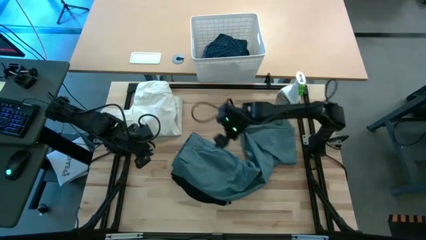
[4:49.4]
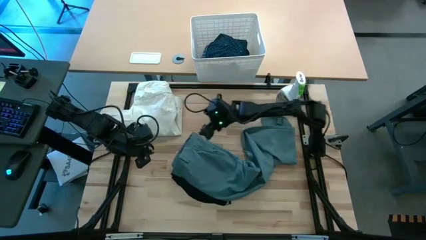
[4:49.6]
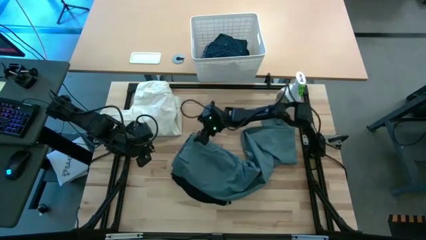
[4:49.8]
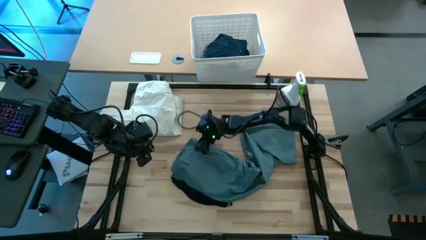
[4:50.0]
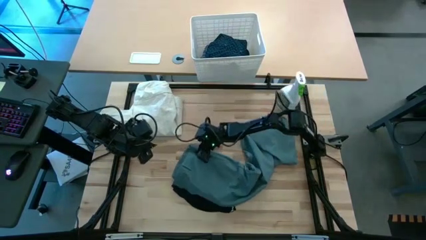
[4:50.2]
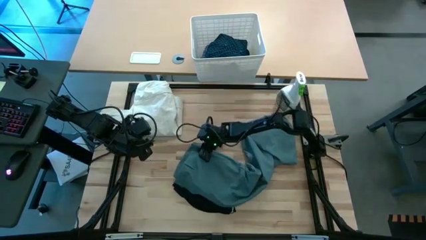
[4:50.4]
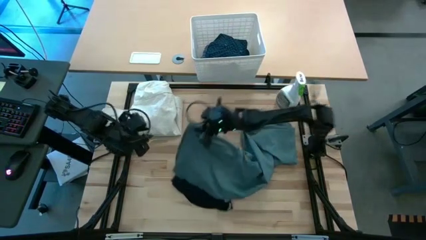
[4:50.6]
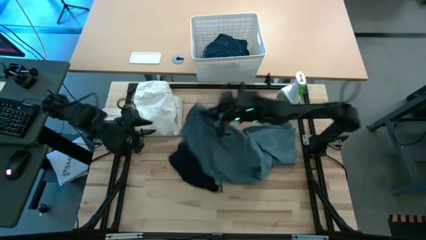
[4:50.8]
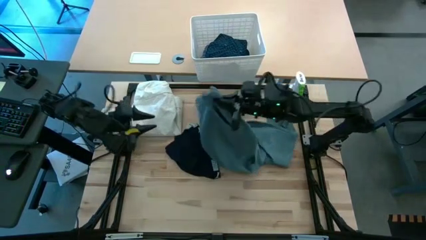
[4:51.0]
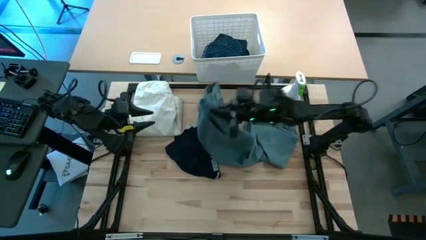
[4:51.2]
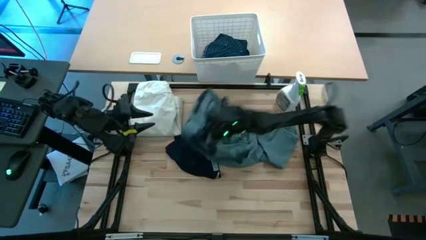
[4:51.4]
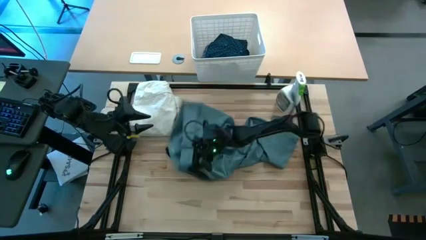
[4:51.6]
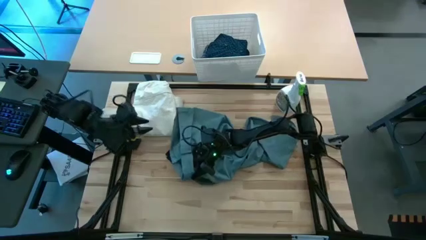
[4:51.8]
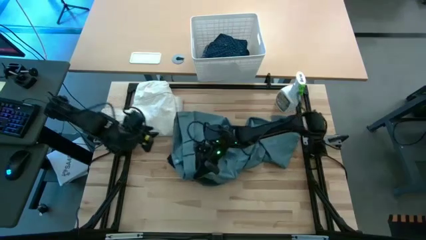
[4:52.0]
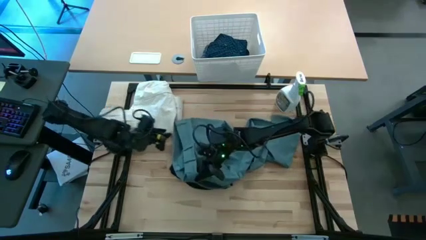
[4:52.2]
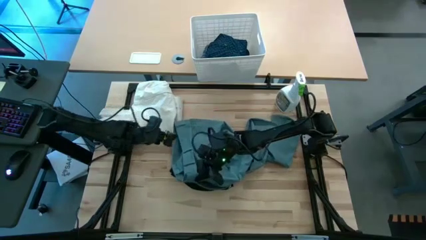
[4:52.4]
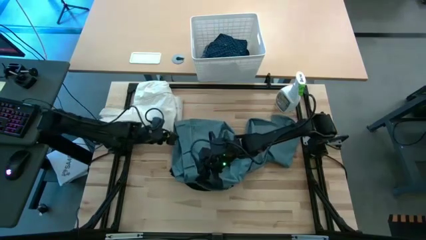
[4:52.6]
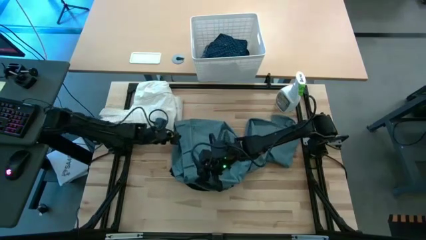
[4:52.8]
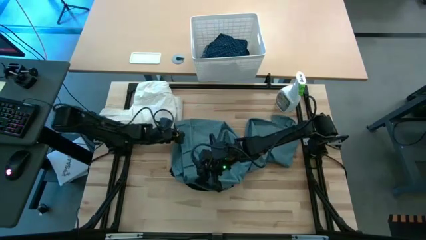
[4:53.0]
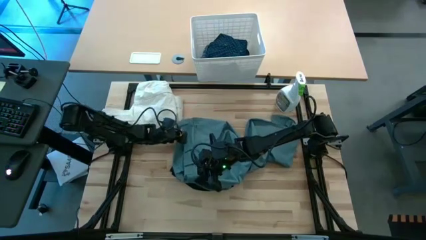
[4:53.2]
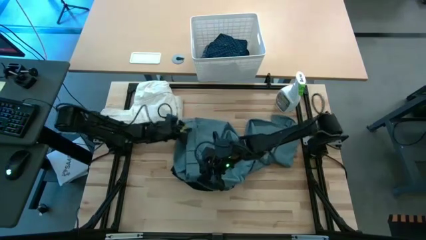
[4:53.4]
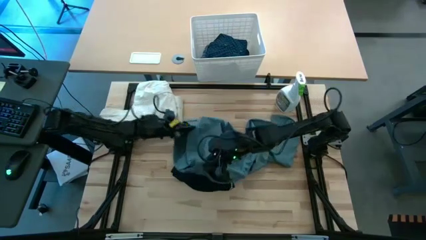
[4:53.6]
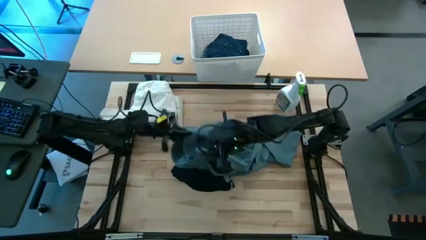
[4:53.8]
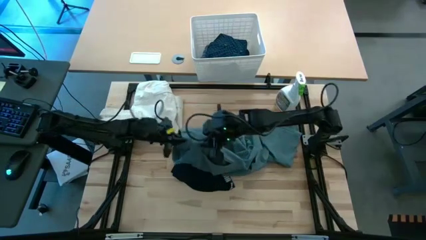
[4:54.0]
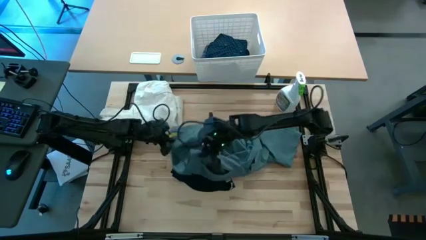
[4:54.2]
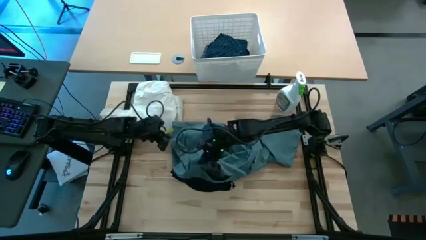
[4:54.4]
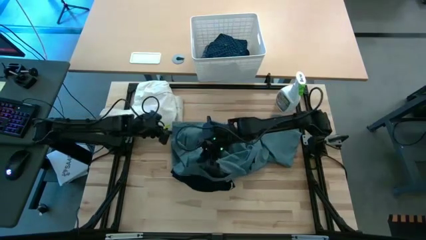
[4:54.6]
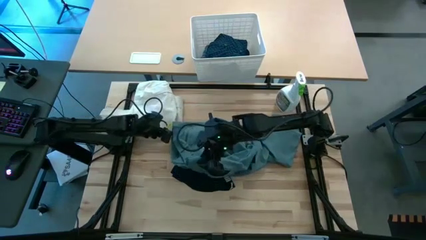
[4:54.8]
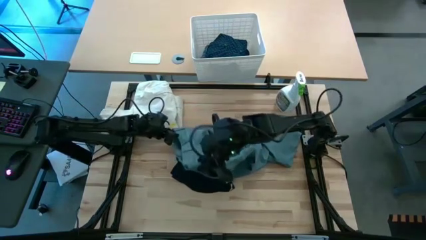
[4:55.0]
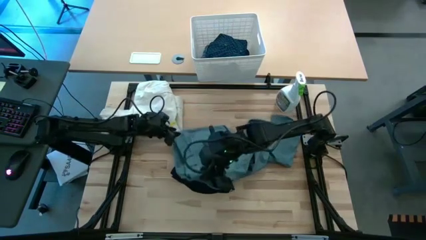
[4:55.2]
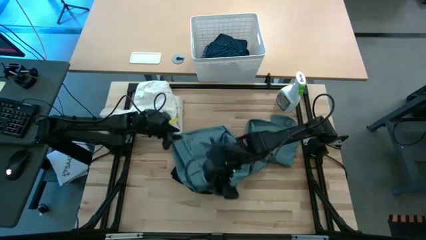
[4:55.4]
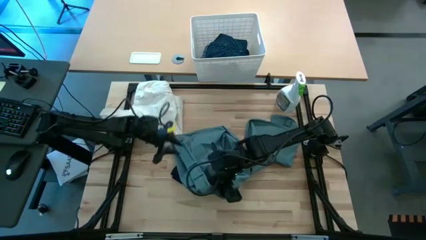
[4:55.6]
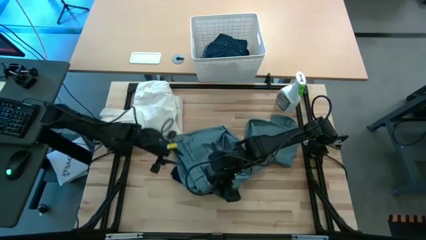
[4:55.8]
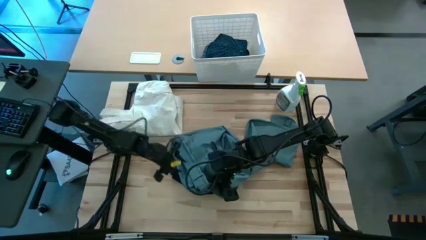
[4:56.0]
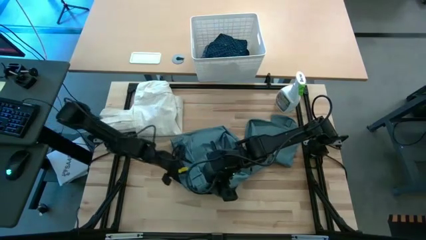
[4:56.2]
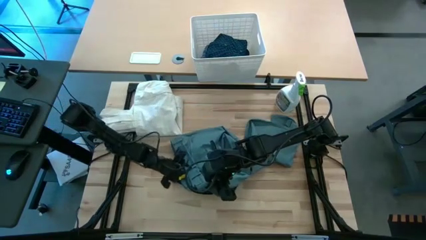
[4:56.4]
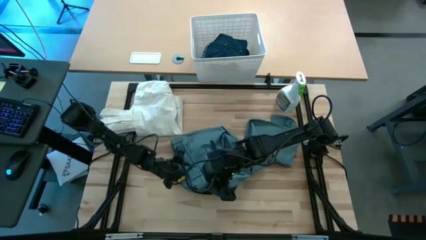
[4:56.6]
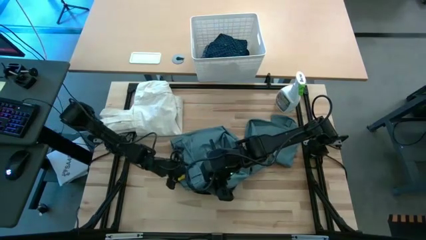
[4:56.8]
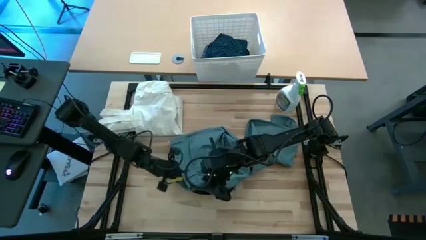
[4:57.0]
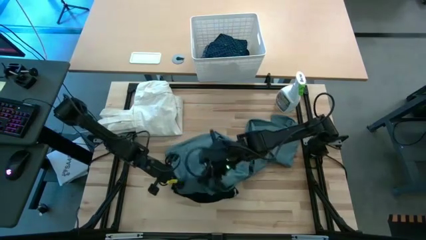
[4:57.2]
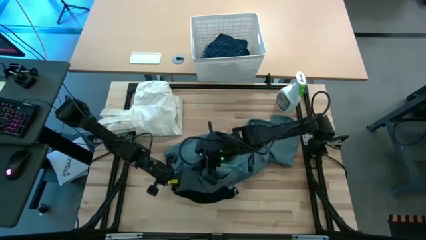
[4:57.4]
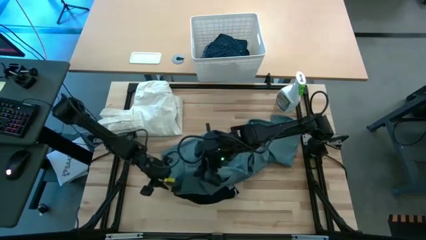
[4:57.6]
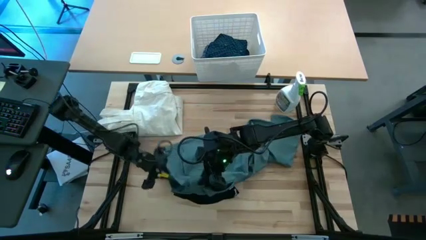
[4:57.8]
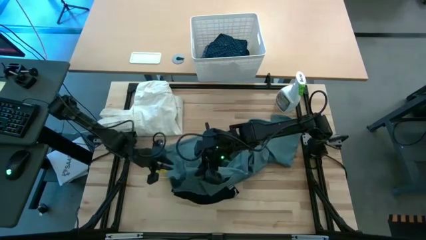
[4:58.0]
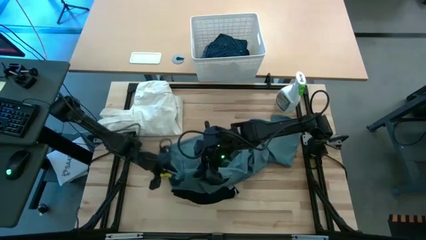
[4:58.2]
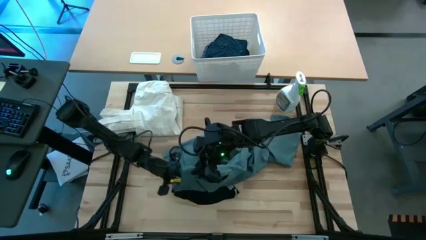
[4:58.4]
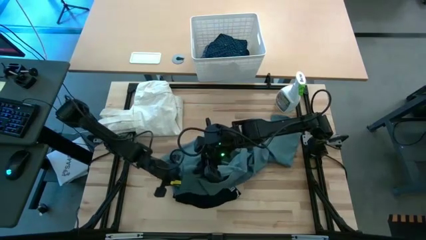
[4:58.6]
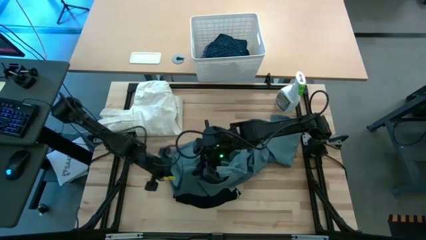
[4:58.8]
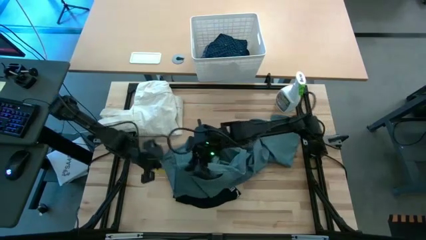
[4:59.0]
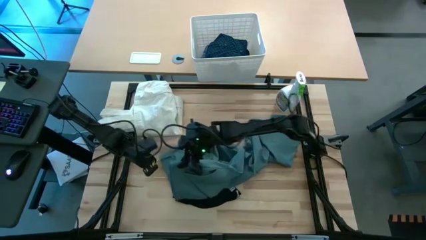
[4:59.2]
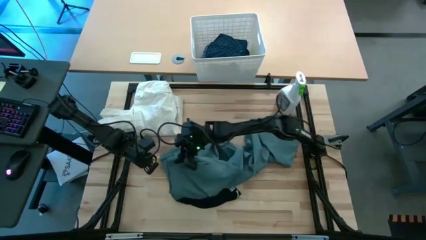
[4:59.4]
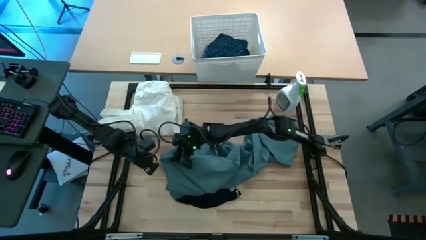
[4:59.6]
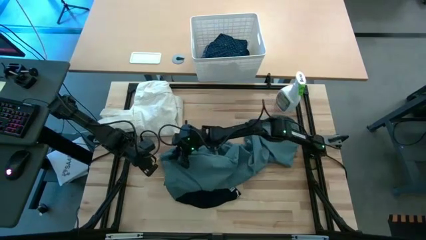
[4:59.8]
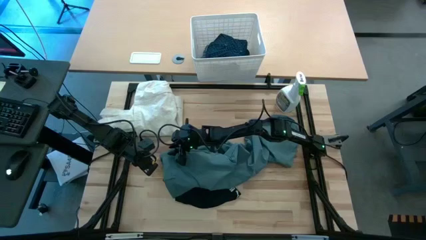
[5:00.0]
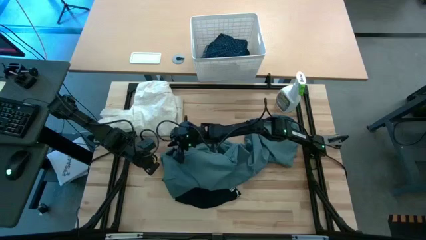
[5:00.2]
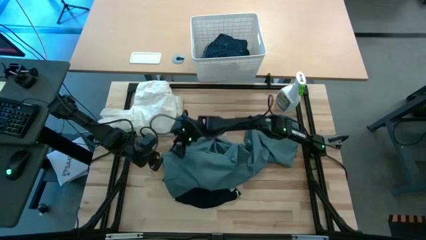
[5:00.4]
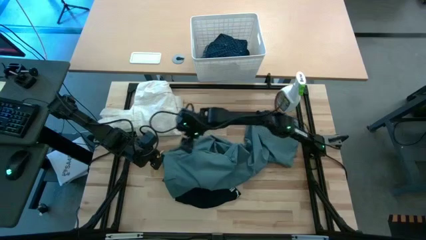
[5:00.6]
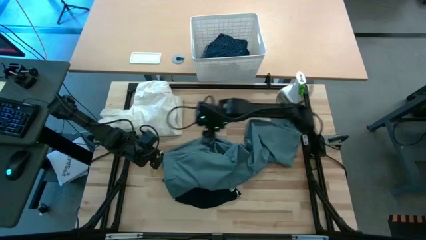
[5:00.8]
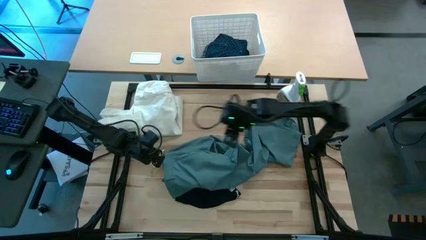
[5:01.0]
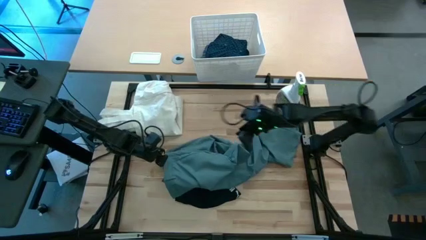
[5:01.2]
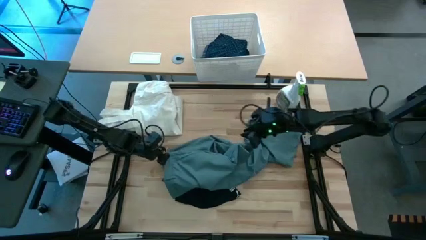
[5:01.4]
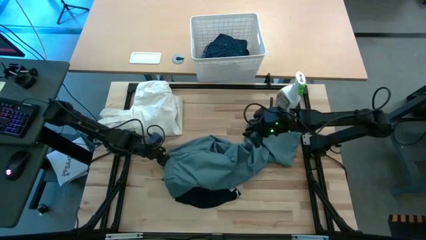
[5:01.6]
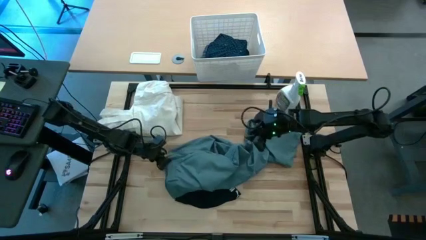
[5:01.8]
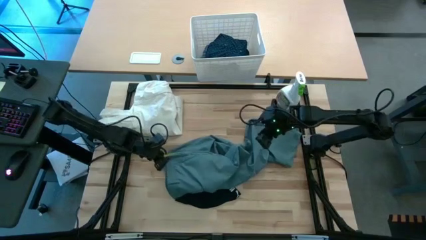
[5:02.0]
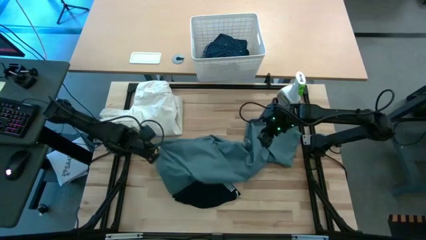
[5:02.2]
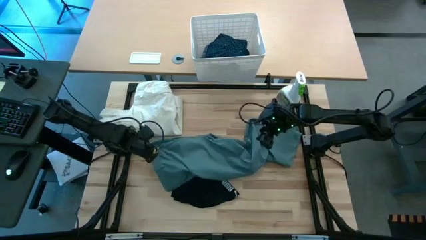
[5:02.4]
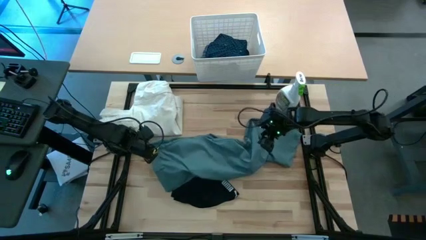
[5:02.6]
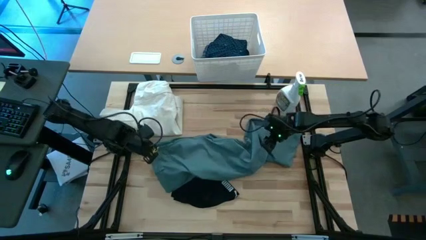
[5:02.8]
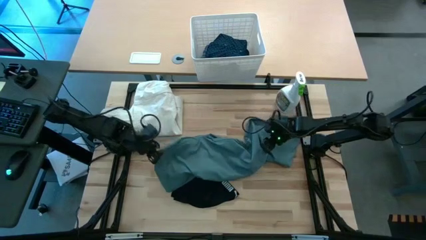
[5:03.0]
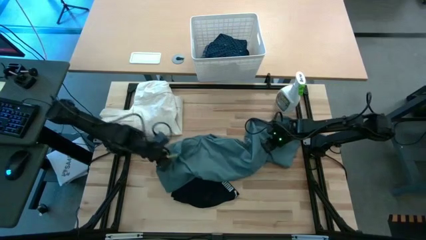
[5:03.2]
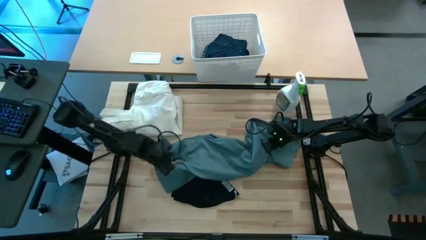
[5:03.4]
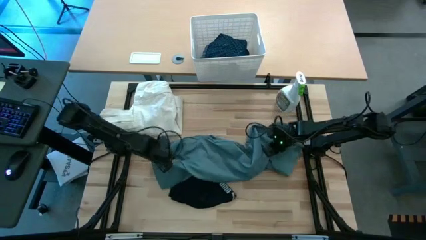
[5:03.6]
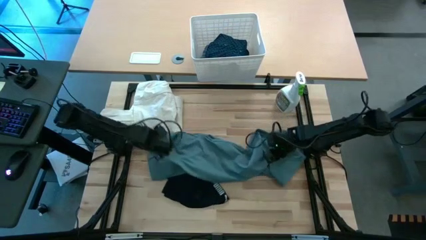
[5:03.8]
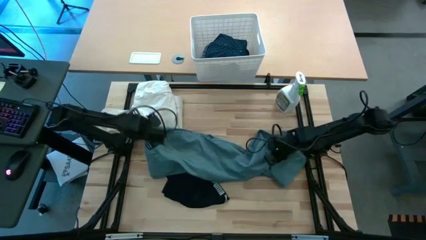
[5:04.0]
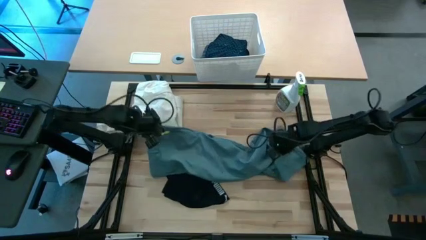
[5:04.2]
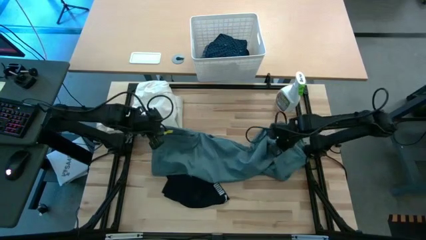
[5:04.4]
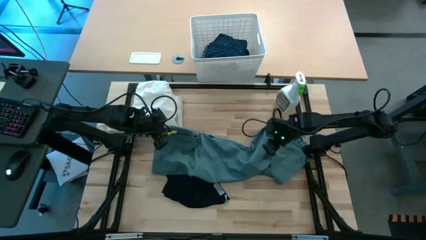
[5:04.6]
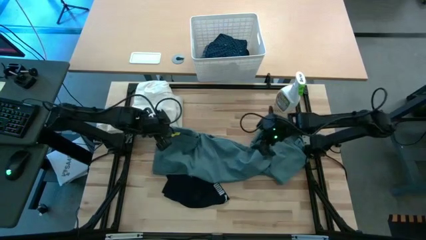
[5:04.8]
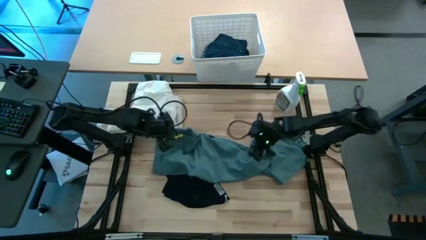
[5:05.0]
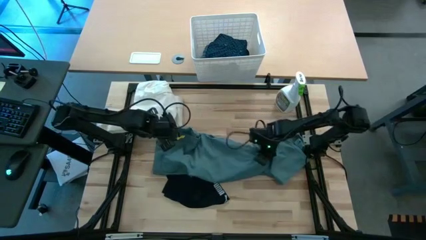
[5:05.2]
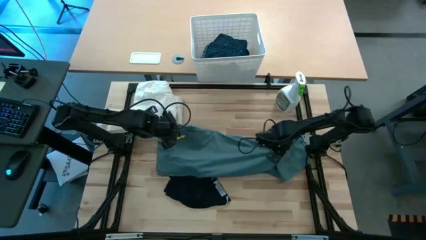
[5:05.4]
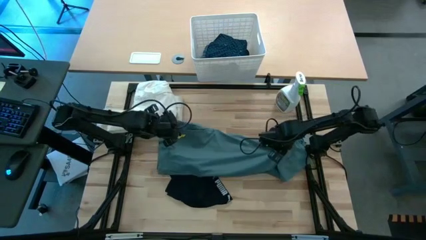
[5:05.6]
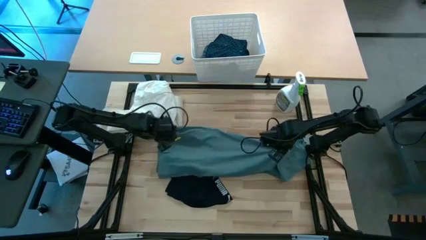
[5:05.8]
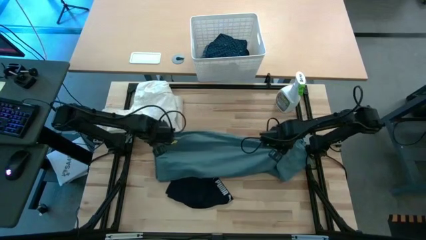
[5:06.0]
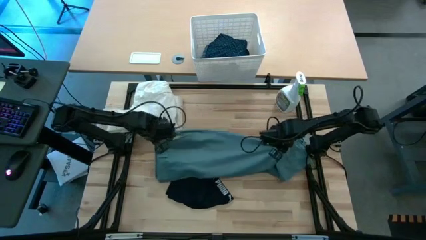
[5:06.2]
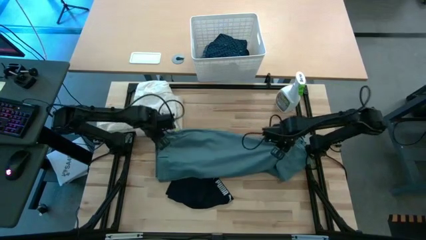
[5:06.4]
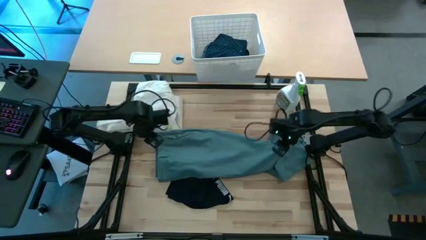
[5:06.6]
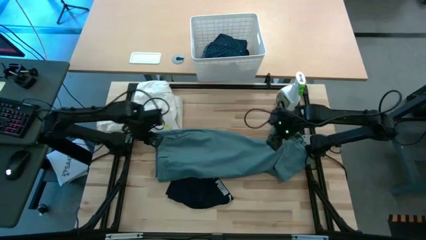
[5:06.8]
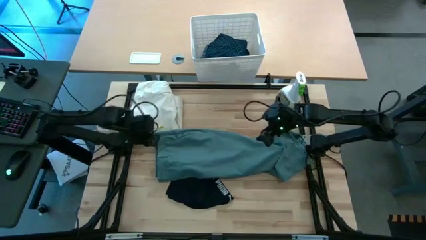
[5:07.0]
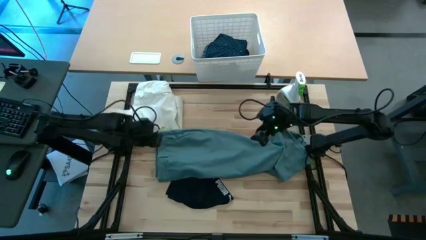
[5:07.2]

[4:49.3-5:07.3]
Fold the green pants
